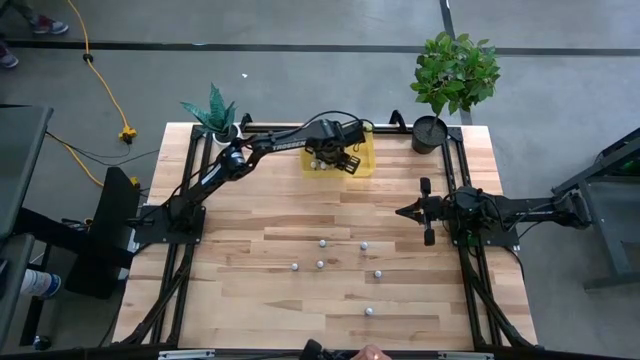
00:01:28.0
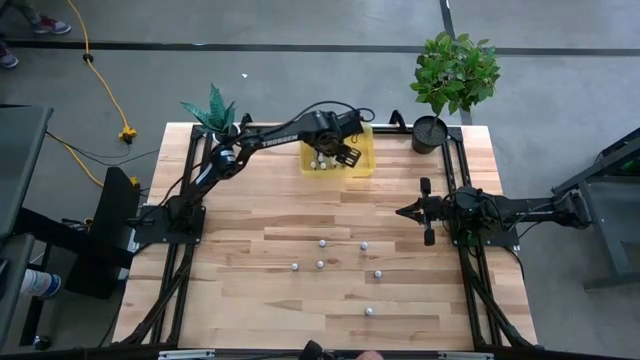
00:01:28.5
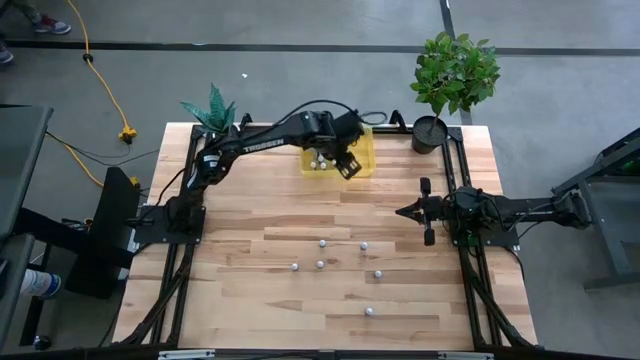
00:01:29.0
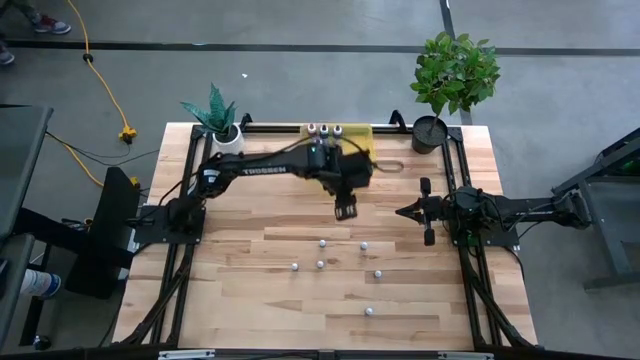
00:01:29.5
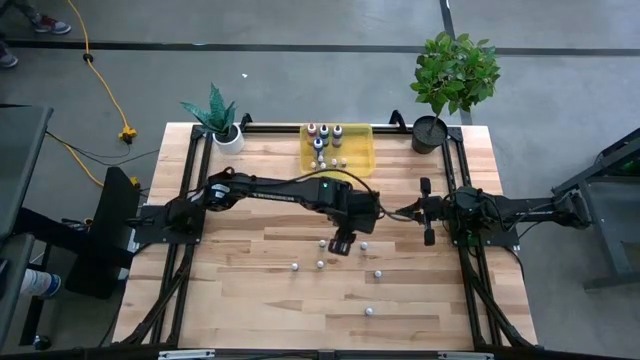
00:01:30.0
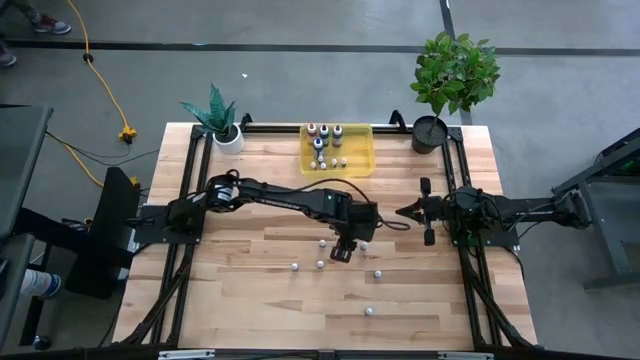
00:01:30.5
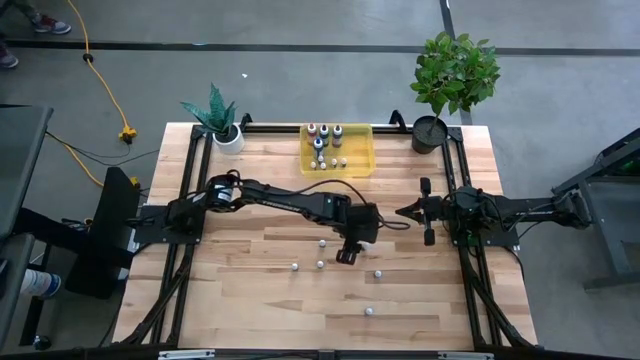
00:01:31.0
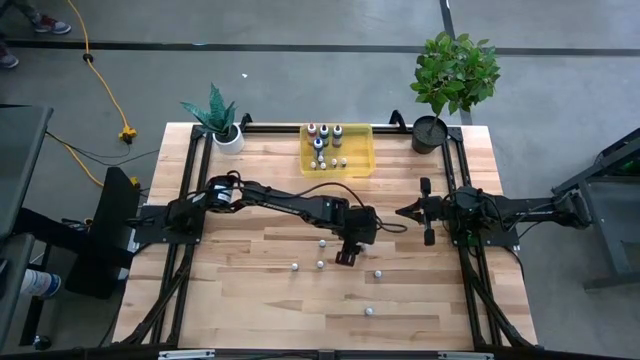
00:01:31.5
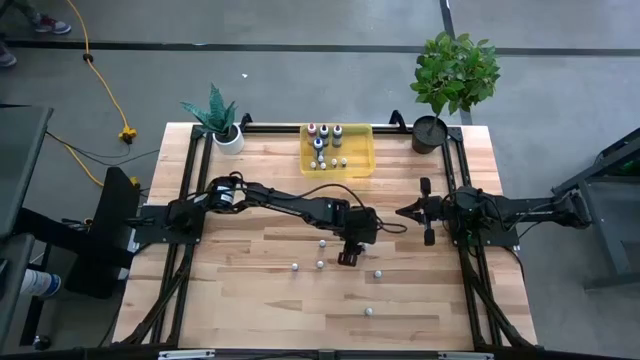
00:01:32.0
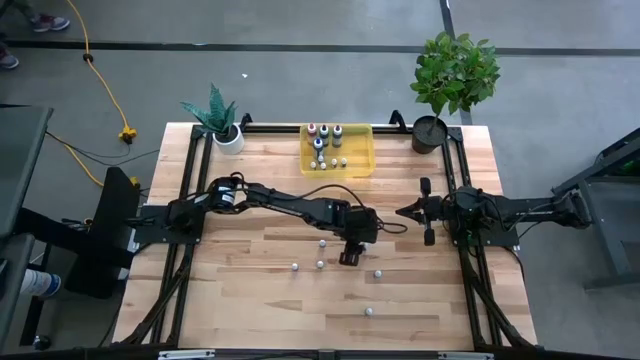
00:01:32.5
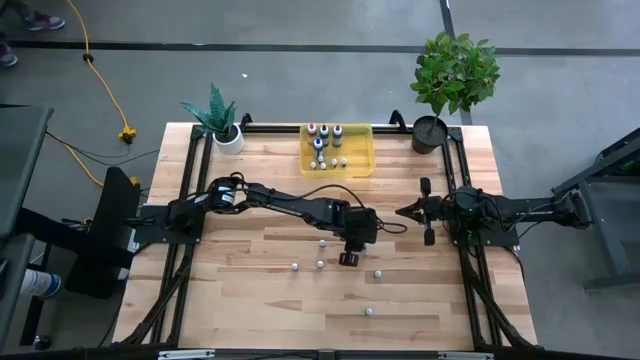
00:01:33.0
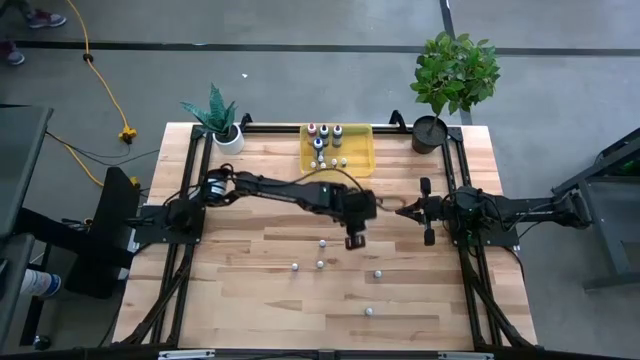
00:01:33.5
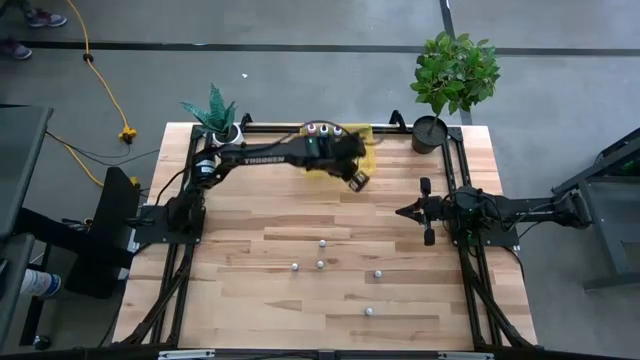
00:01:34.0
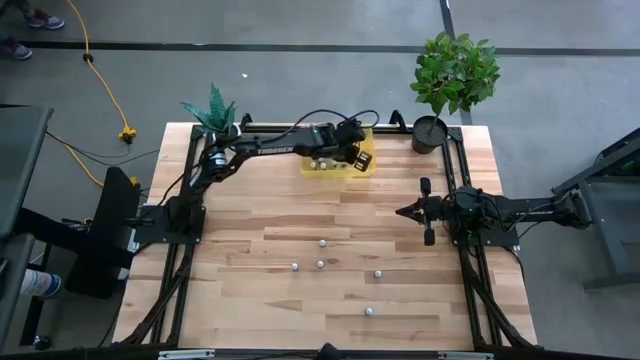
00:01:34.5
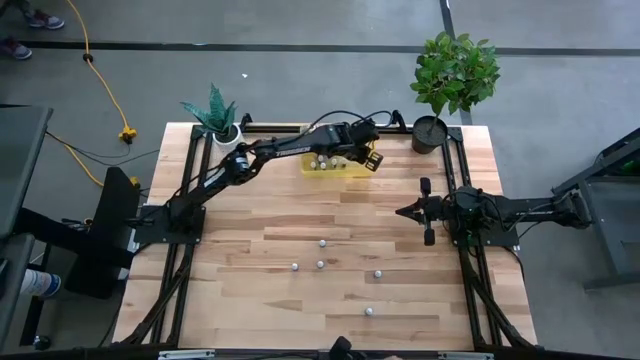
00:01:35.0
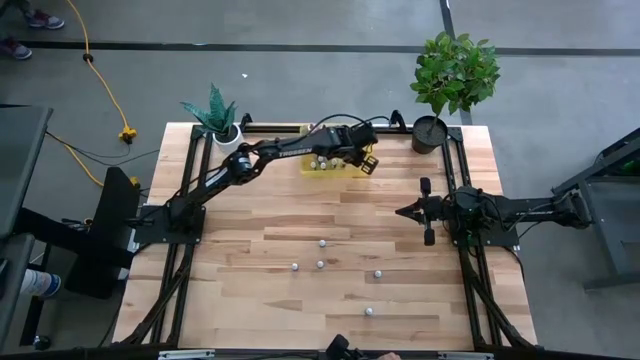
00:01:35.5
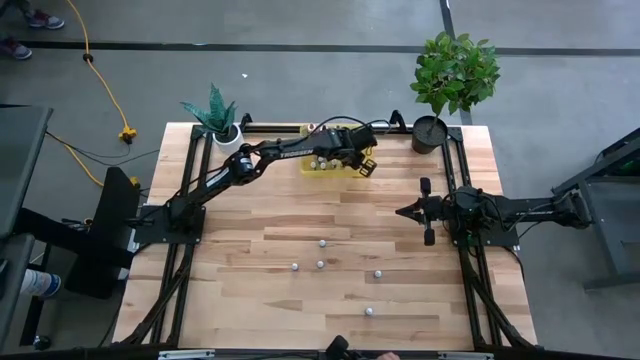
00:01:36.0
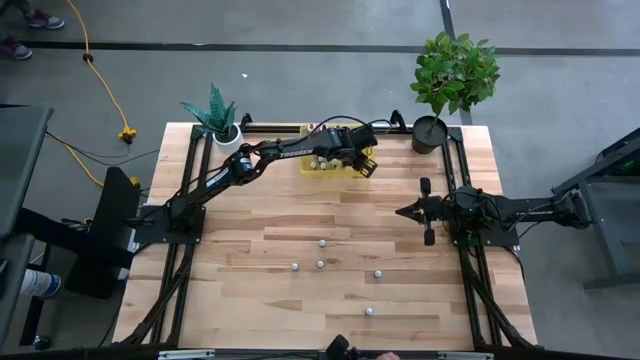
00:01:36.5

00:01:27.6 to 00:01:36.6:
Task: Pick & Place food coloring
Put the small blue food coloring bottle into the yellow bin

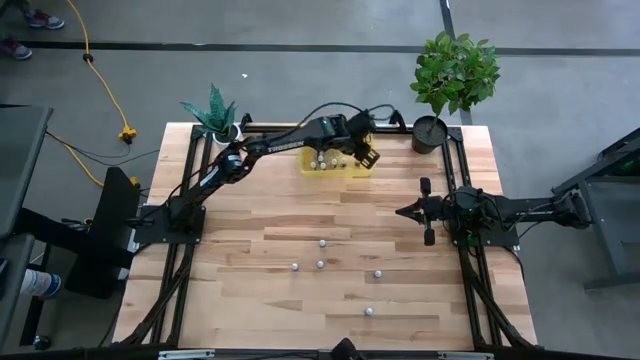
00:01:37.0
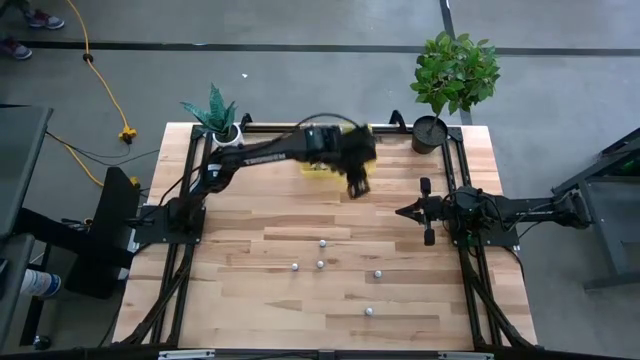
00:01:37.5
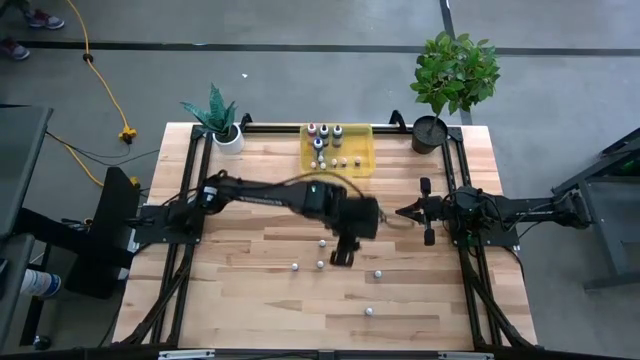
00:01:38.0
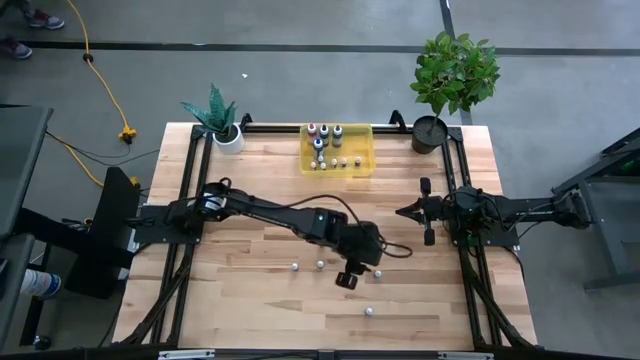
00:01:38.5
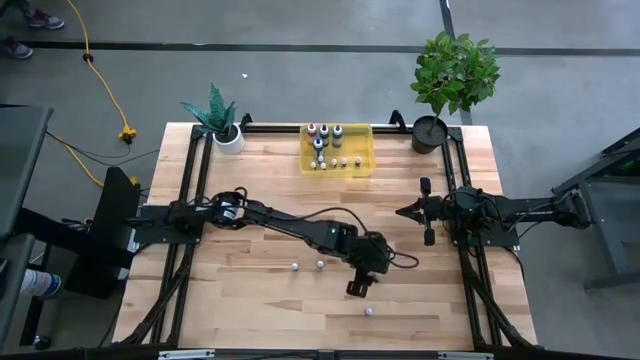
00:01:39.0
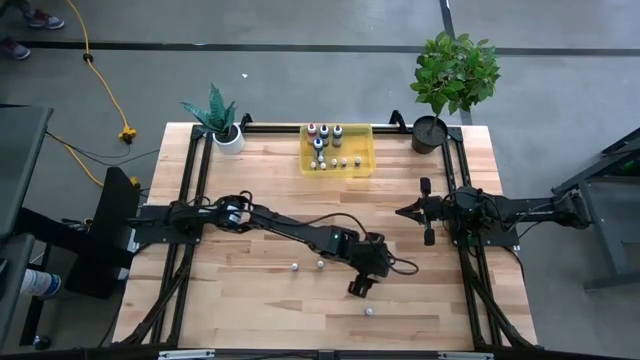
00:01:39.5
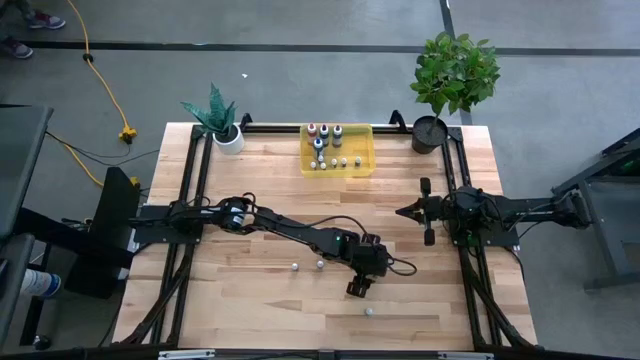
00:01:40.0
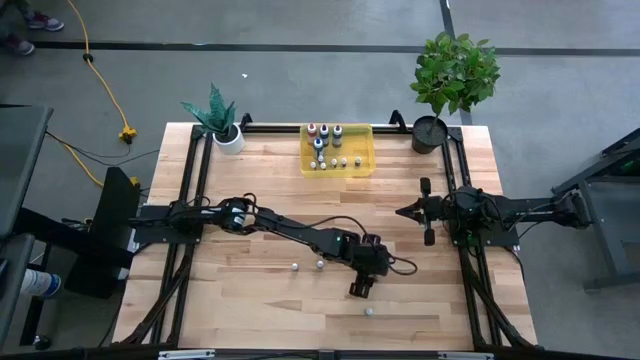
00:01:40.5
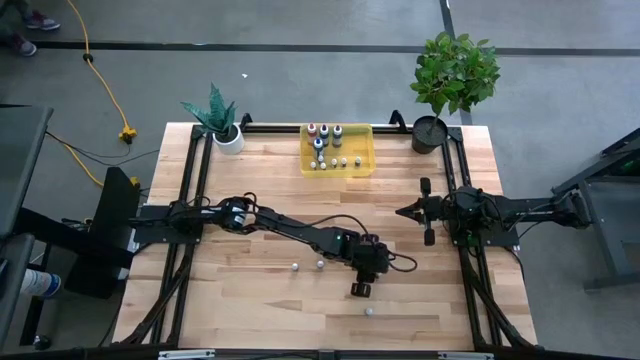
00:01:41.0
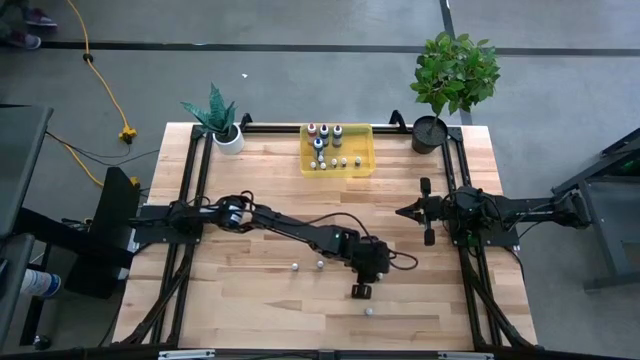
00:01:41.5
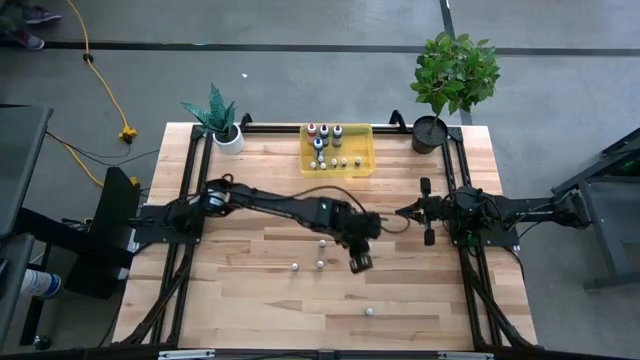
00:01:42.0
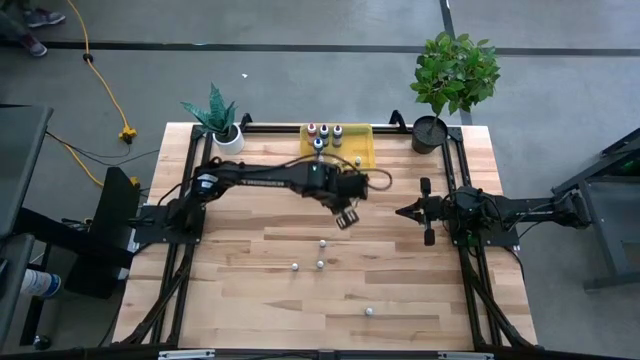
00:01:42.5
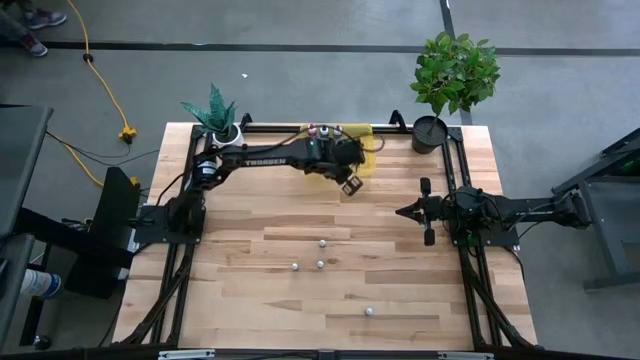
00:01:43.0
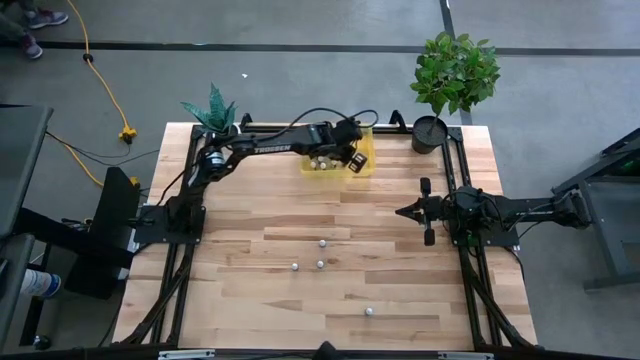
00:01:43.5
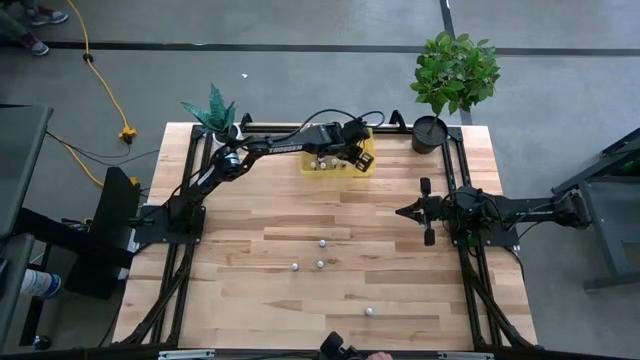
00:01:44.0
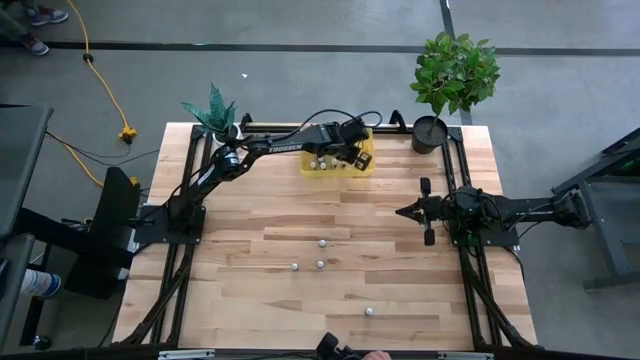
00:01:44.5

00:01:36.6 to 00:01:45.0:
Put the small purple food coloring bottle into the yellow bin

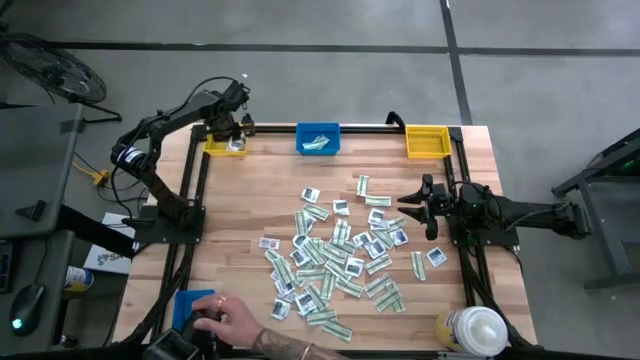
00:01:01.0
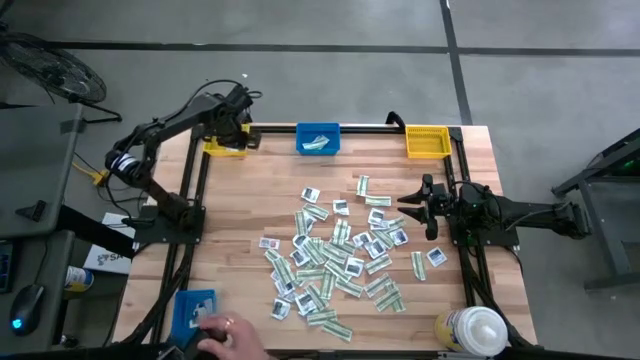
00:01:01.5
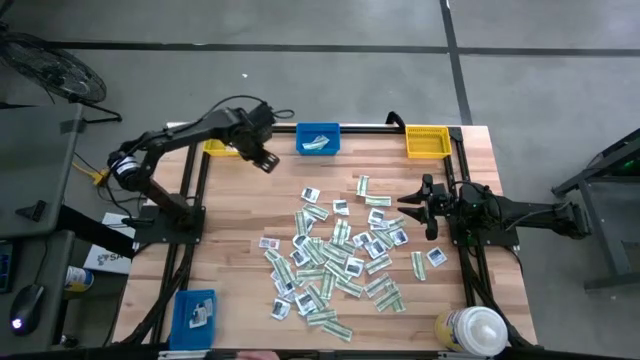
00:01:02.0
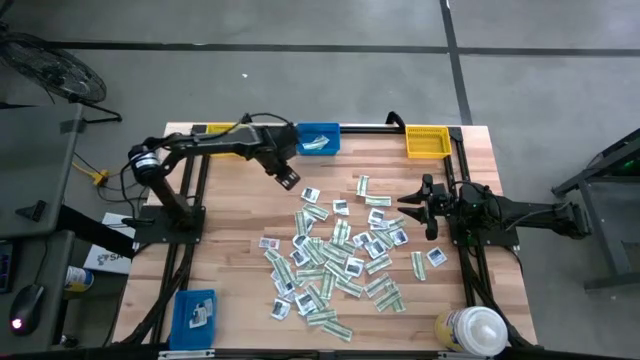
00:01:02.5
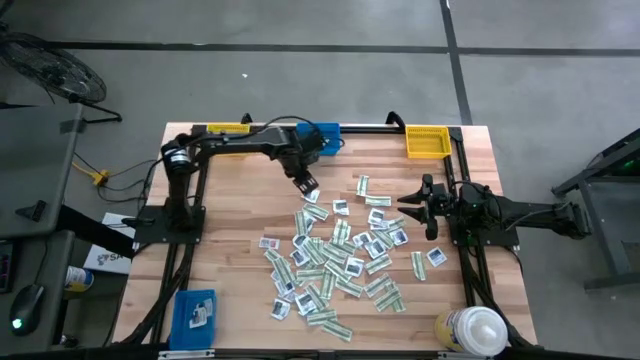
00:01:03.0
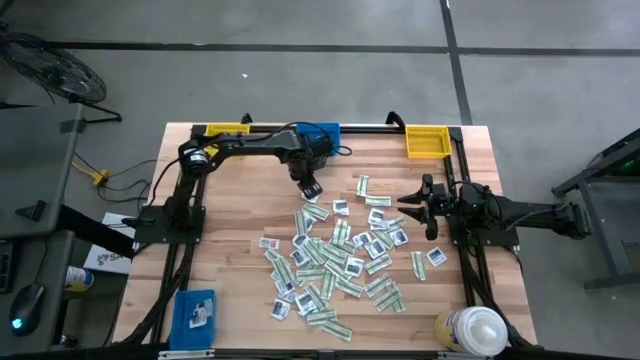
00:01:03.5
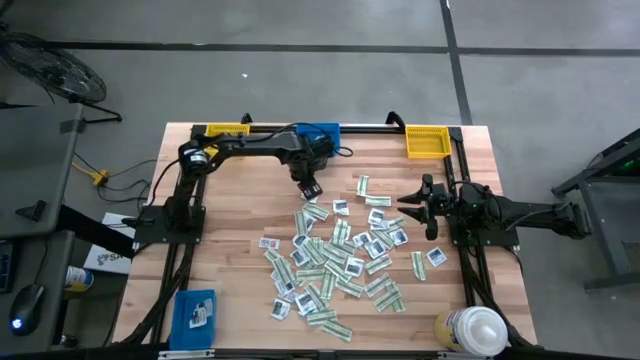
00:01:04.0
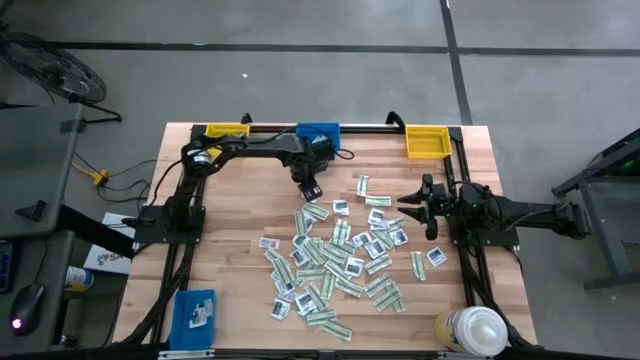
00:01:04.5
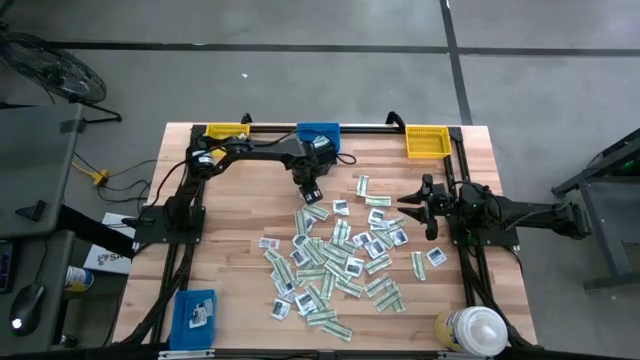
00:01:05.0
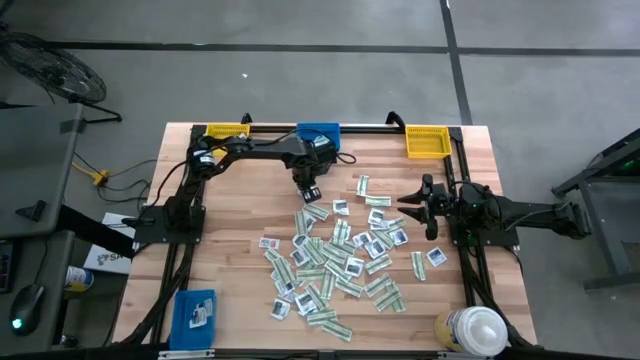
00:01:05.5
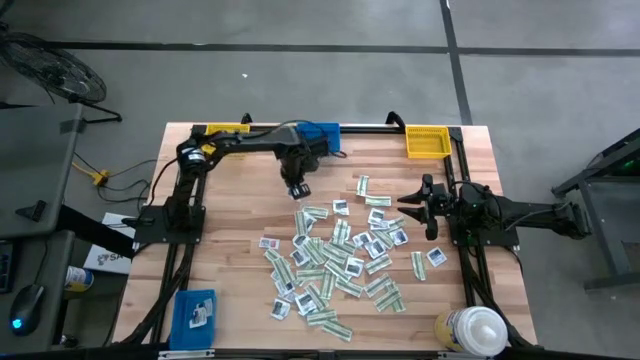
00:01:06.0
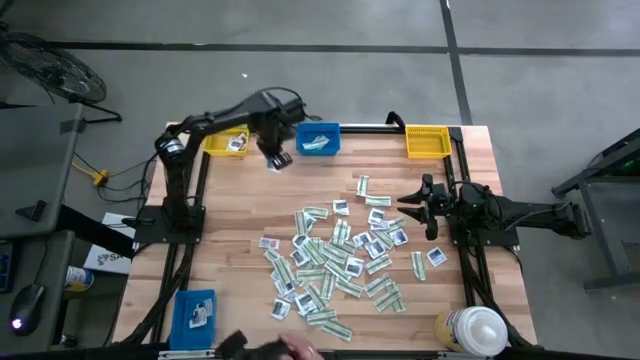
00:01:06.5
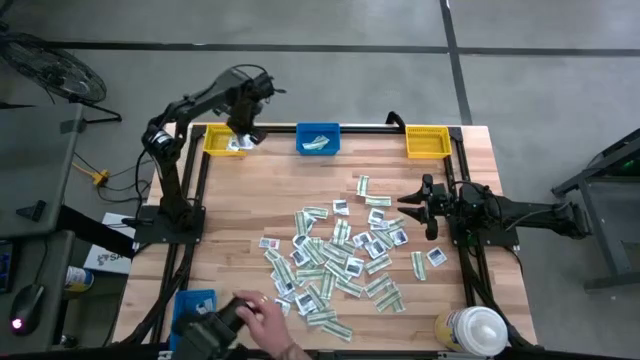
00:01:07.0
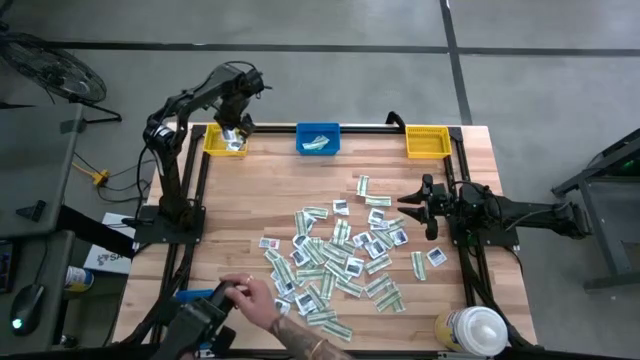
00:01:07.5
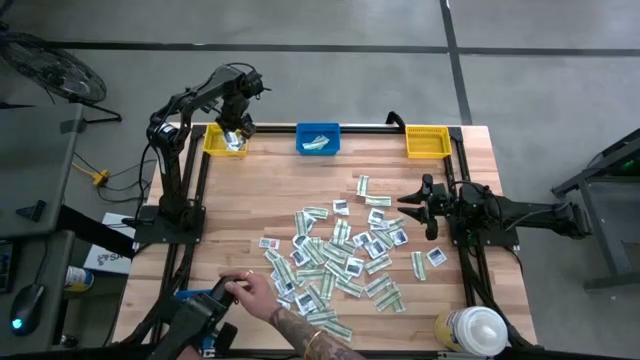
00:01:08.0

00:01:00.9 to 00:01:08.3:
Task: Pick & Place First Aid Supplies
Put the gray towelette pack into the left yellow bin
